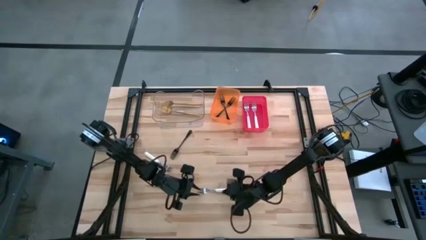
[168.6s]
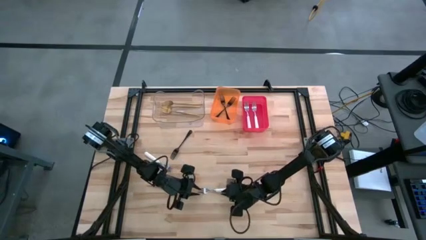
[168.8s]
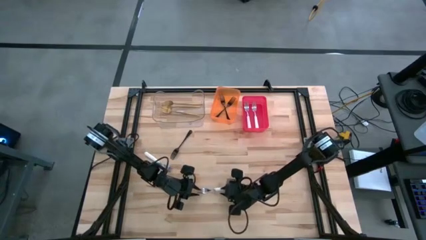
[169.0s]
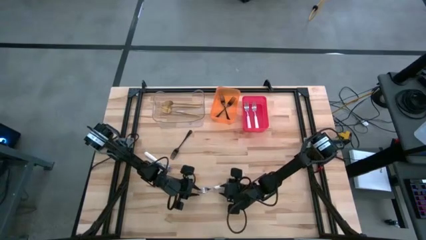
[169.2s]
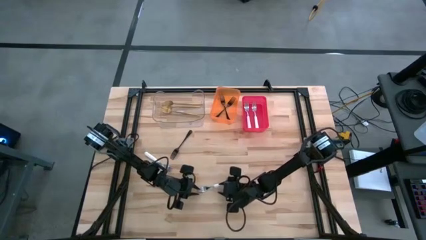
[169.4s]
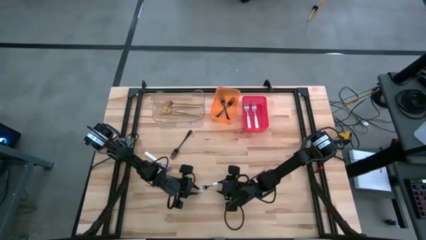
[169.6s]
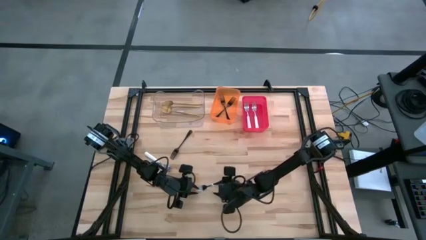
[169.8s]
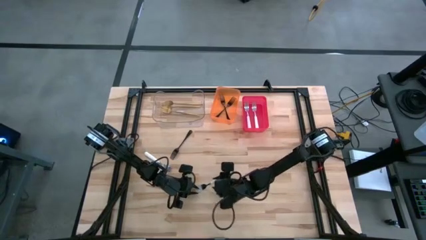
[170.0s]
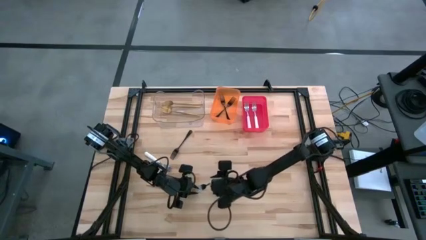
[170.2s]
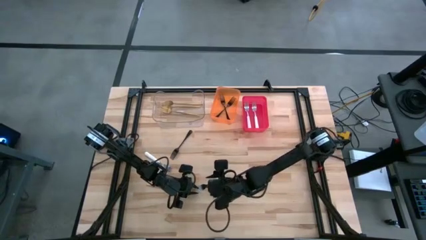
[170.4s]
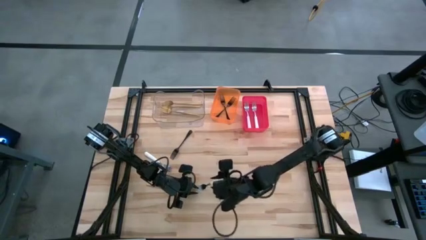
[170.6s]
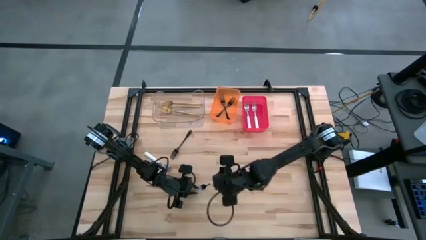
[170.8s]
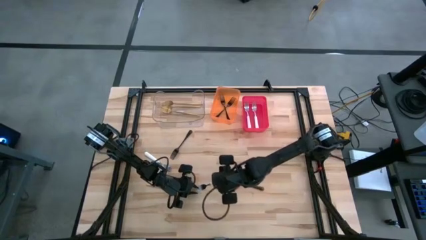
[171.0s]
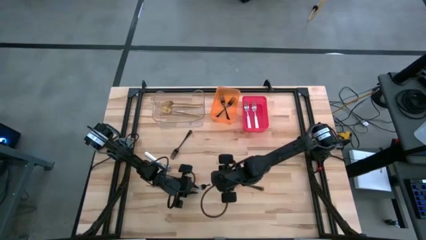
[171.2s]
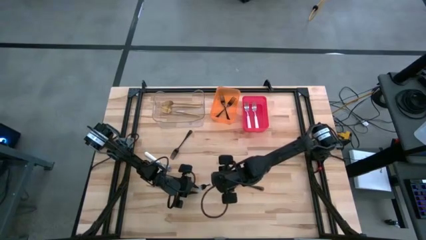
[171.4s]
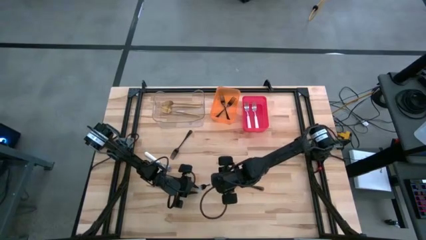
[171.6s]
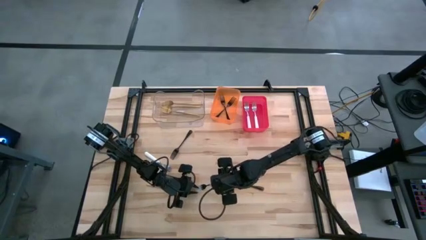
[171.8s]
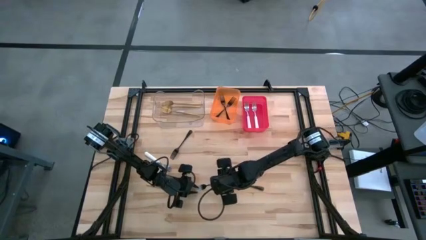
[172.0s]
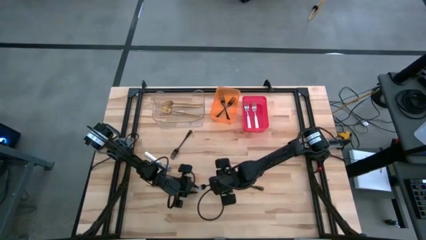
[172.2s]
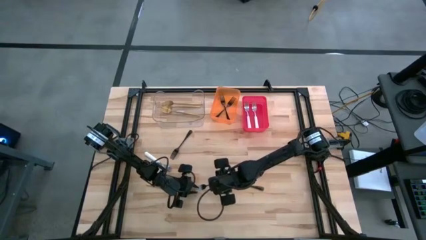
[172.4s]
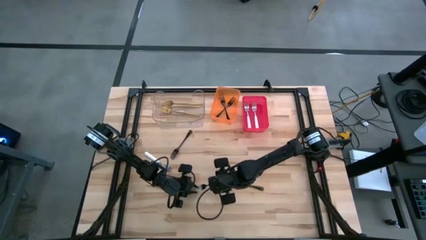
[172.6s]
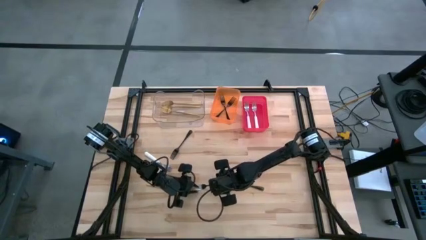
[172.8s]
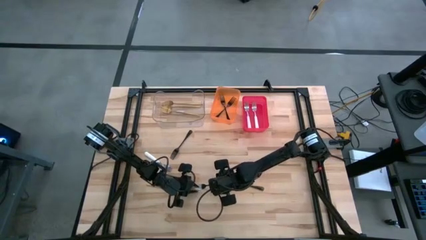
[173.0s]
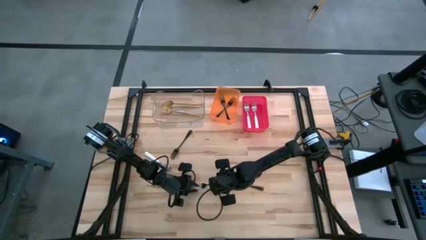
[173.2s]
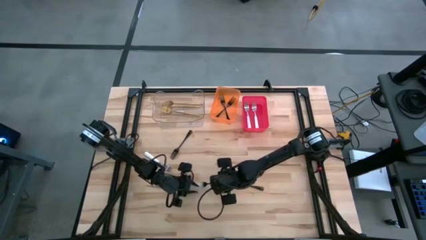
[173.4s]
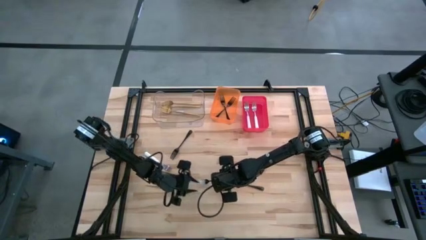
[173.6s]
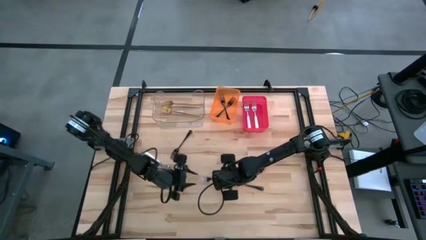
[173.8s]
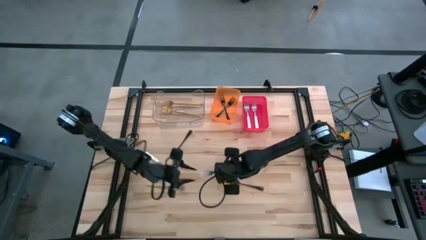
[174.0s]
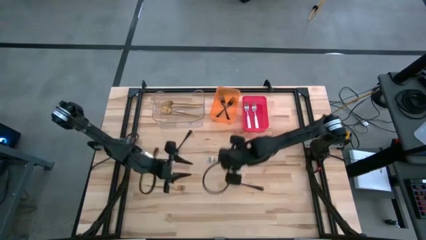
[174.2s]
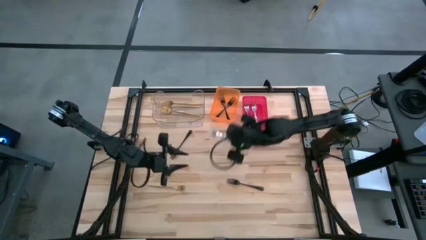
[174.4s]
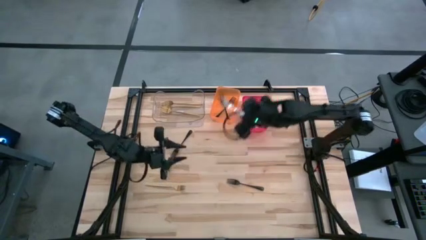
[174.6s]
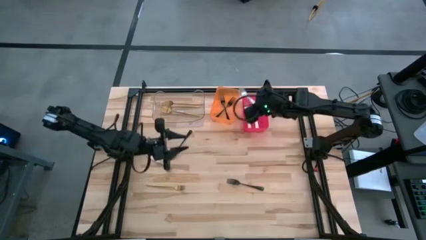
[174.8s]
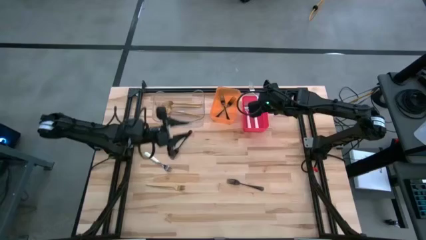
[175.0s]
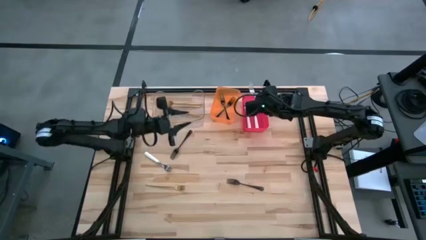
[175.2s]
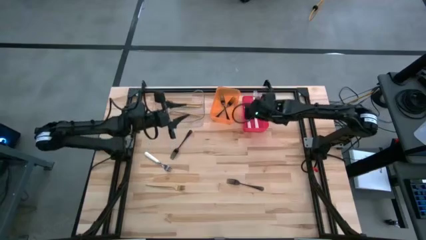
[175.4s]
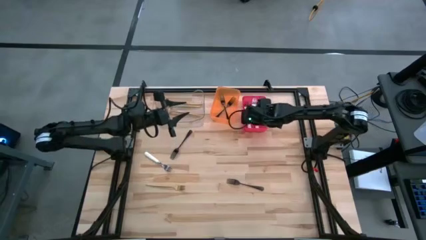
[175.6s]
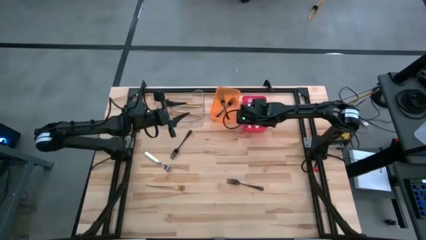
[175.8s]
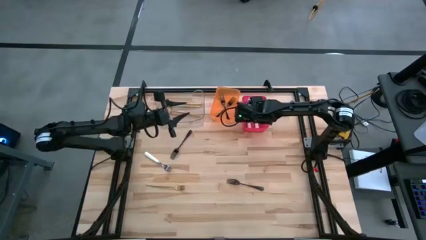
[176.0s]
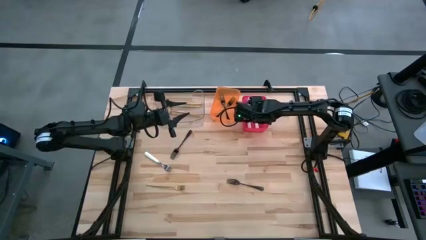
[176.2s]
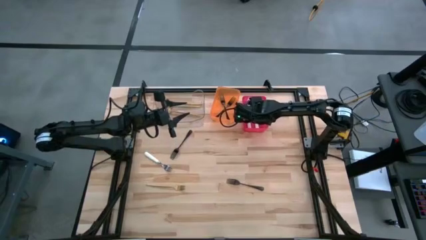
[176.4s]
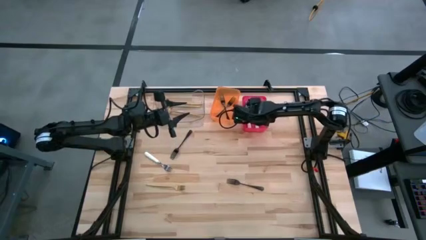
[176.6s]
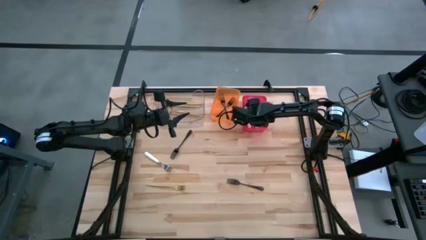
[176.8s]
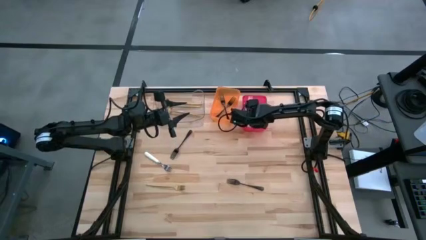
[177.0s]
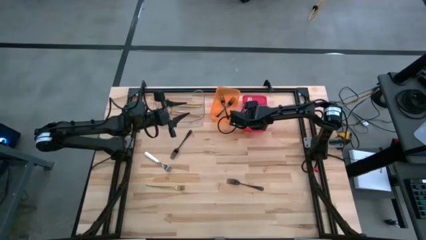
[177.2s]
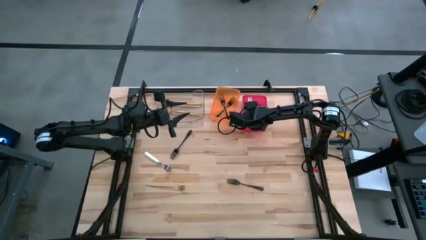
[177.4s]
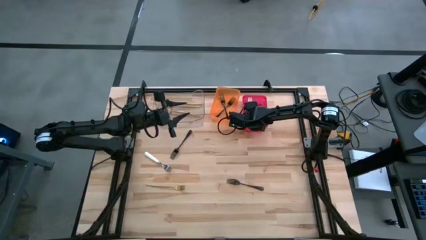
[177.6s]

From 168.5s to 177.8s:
Task: Sort silverware by color (type)
Put the white fork into the red bin

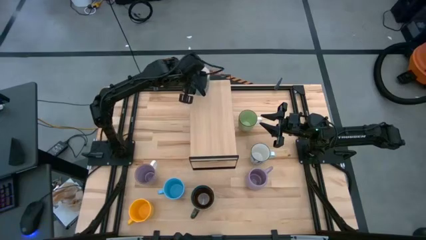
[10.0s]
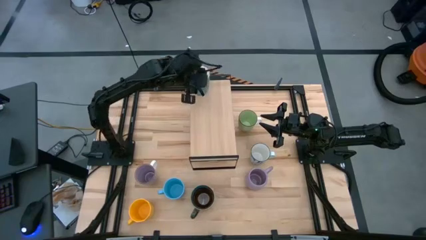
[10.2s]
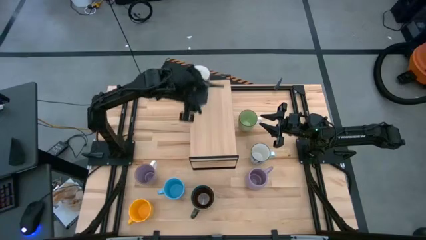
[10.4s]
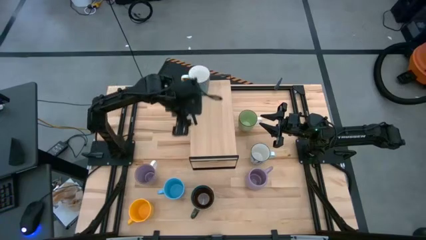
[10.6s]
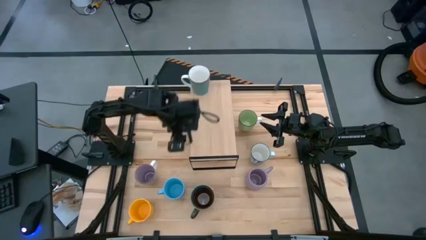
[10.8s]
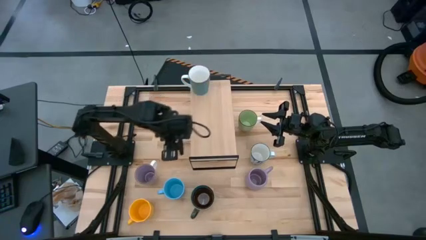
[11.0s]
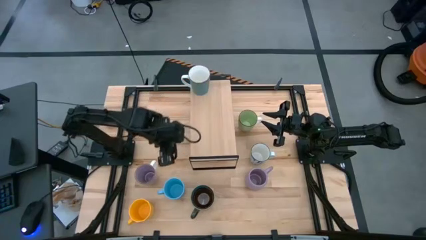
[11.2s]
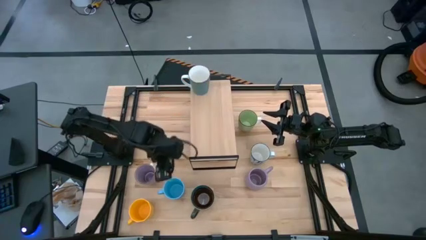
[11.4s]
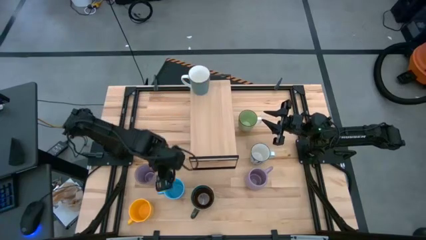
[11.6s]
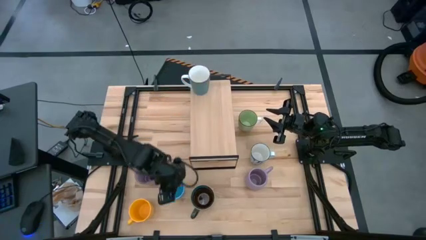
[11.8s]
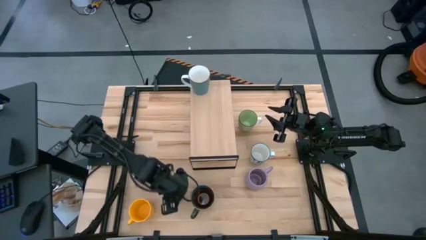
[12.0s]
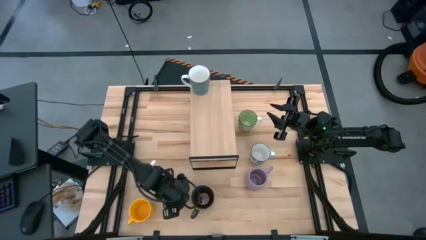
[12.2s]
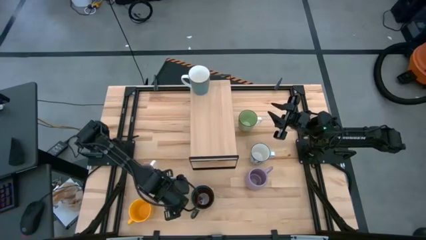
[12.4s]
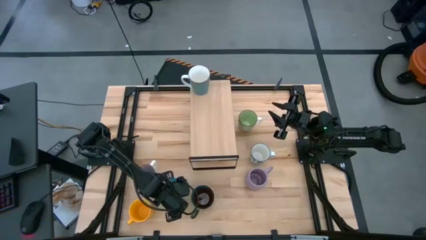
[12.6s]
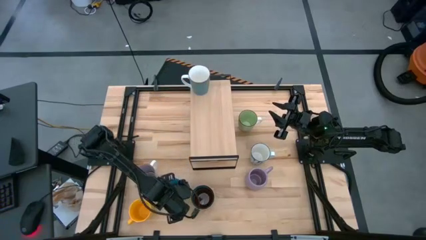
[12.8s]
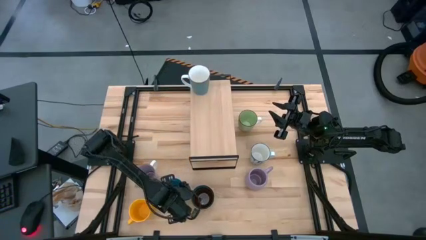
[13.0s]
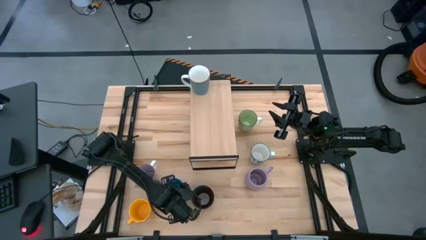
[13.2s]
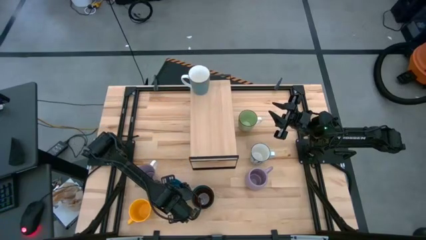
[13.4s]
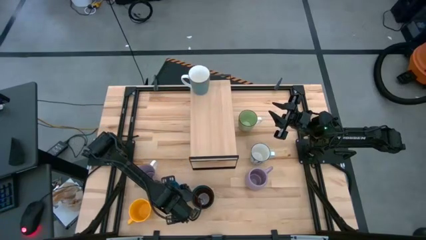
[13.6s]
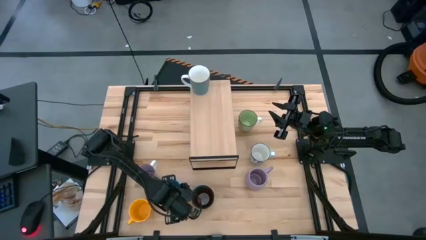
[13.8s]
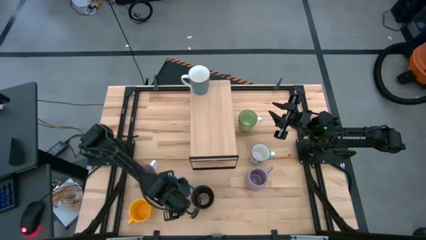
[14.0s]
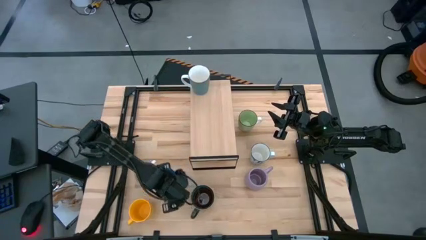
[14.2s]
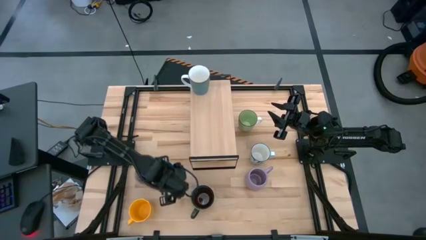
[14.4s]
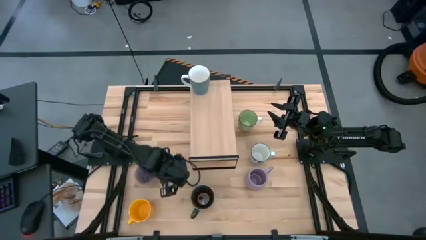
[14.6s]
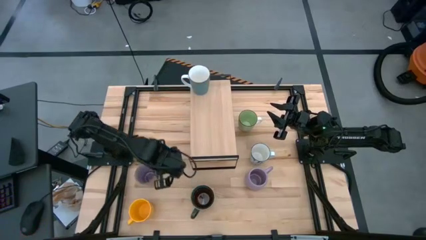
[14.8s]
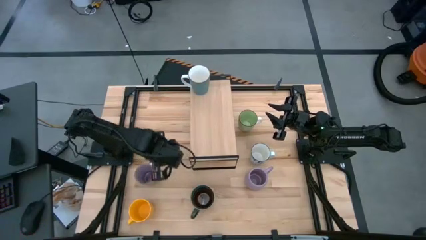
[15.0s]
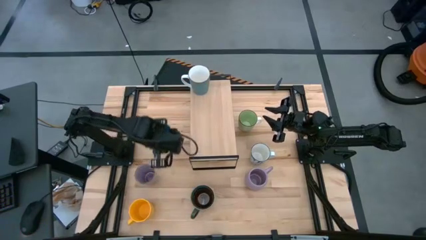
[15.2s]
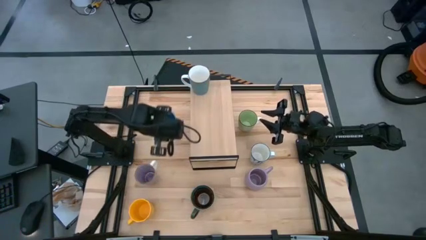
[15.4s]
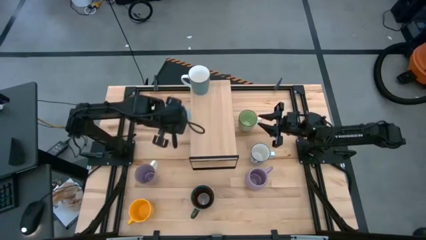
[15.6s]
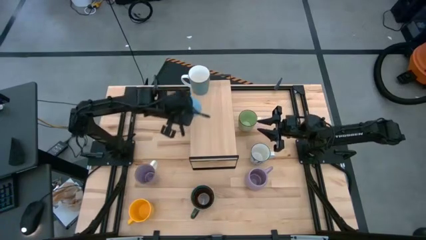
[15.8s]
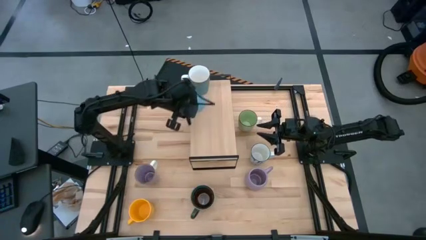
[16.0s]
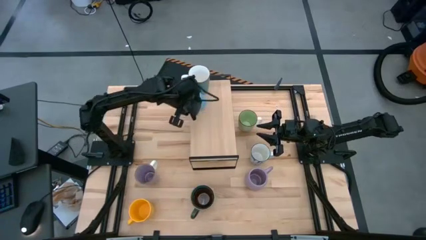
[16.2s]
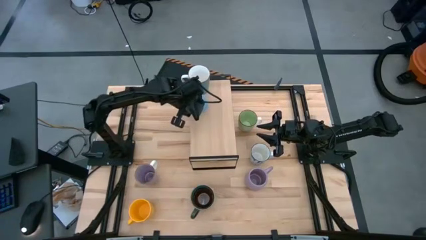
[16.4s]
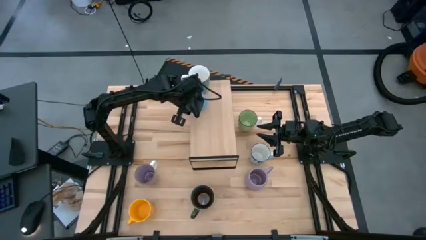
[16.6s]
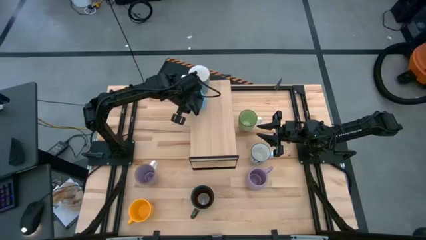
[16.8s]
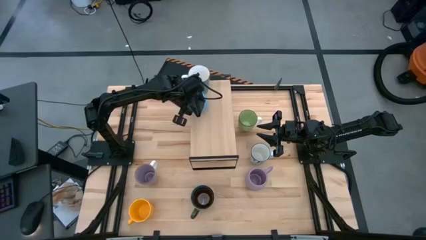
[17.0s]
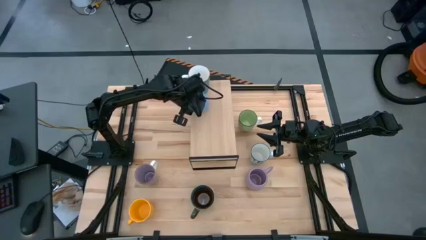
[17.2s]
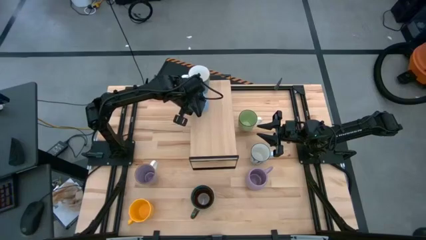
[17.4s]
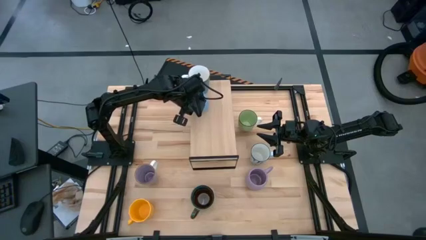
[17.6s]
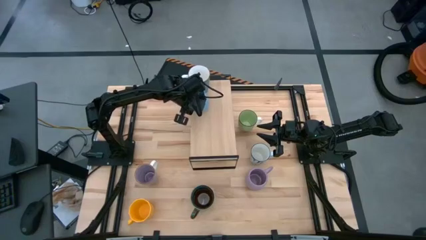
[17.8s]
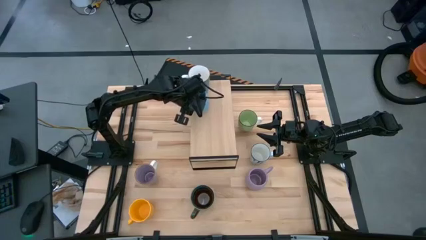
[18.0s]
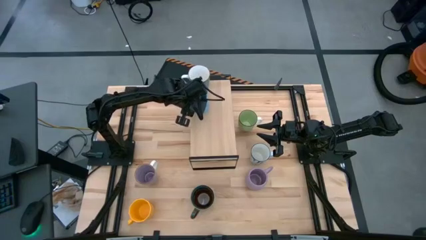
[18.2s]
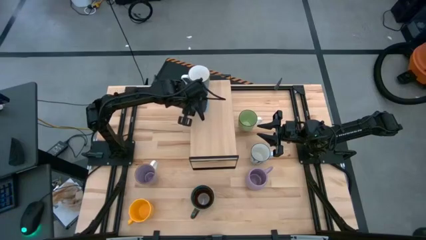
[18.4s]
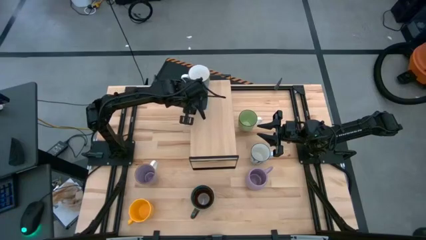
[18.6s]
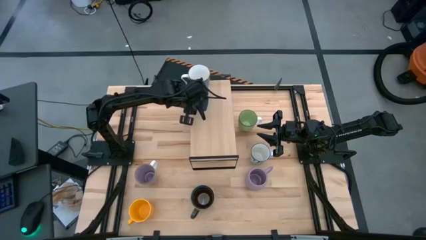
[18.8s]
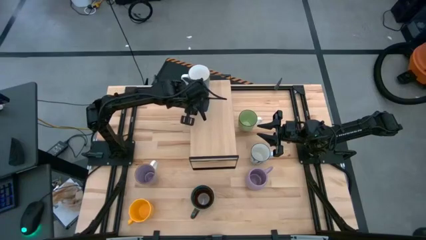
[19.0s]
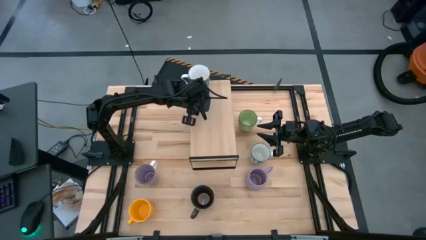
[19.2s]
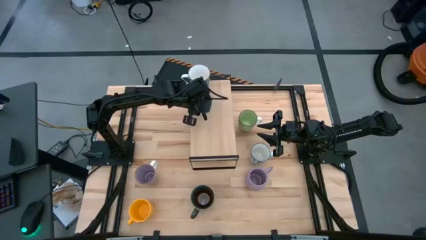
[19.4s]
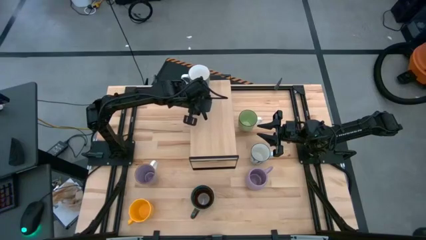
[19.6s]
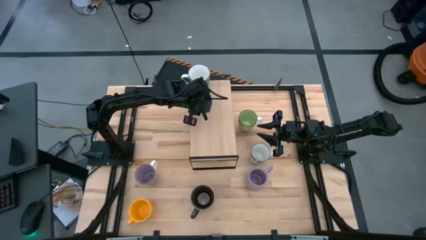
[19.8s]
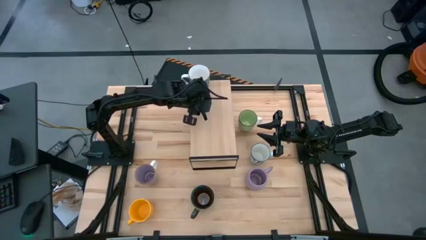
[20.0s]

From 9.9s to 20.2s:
Task: Place coffee mugs
Put the light blue mug on the shelf
